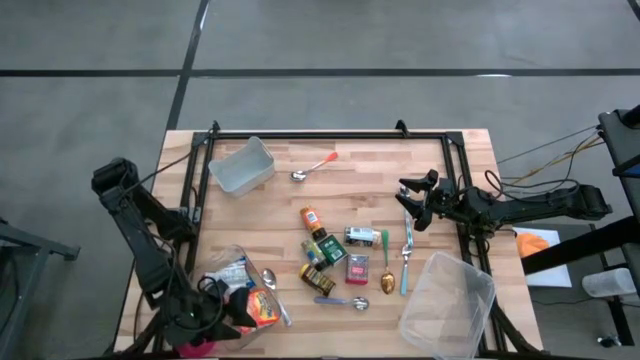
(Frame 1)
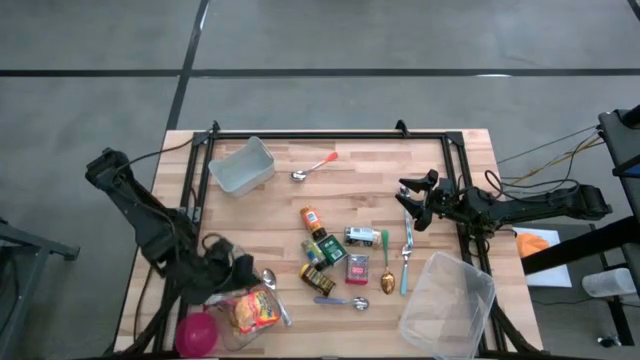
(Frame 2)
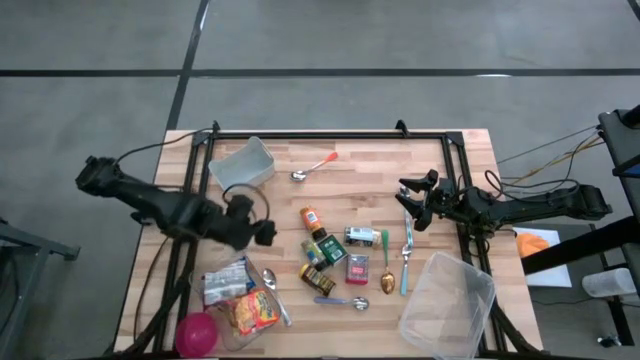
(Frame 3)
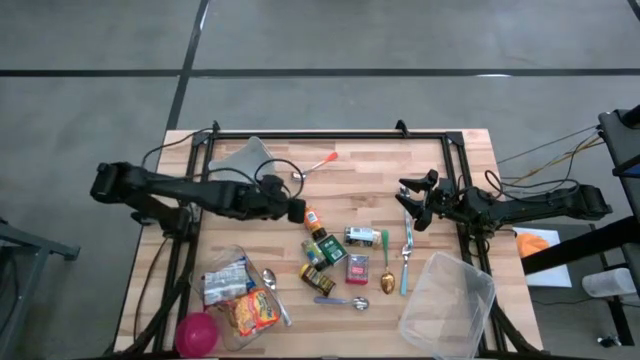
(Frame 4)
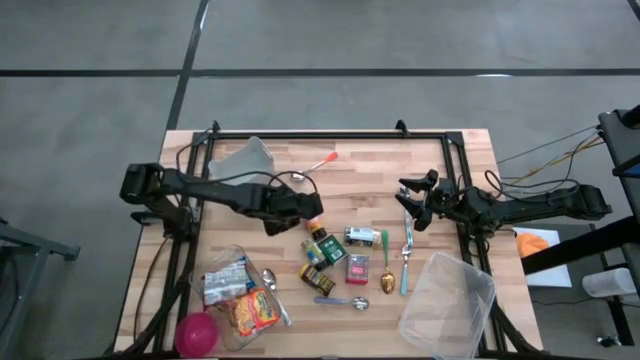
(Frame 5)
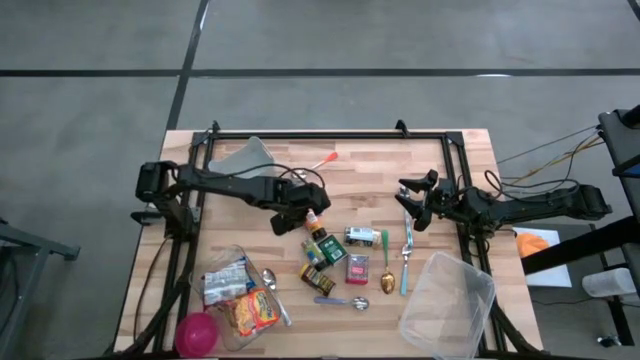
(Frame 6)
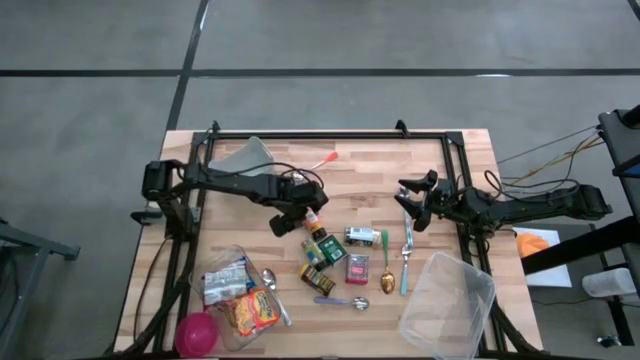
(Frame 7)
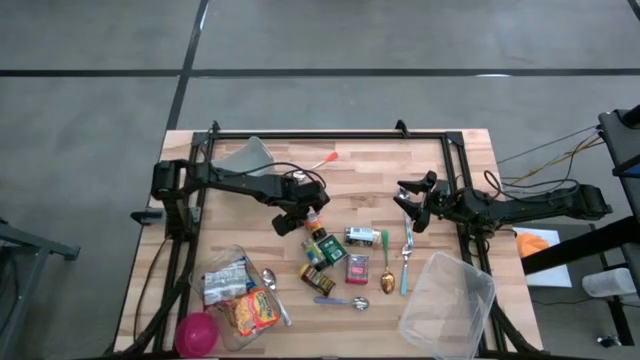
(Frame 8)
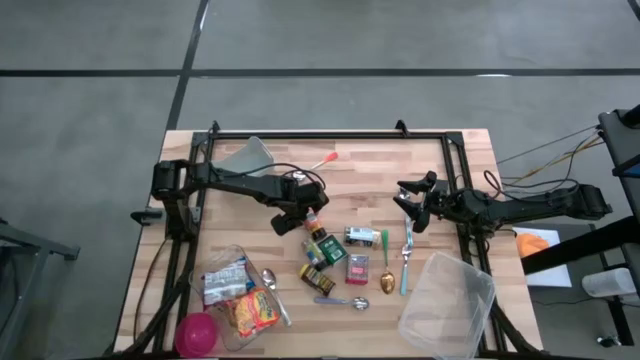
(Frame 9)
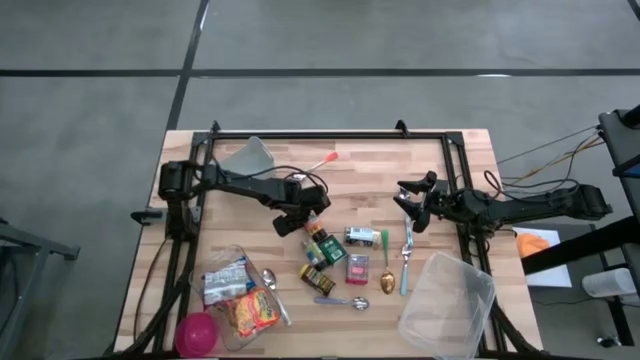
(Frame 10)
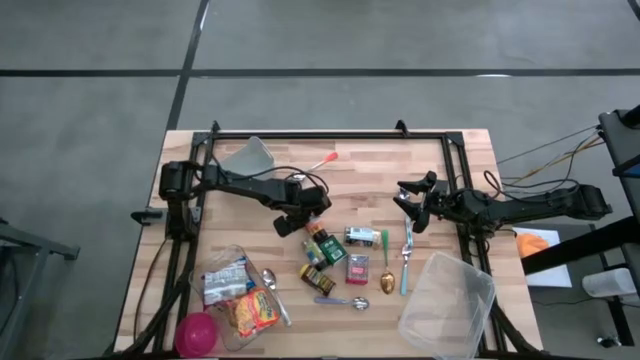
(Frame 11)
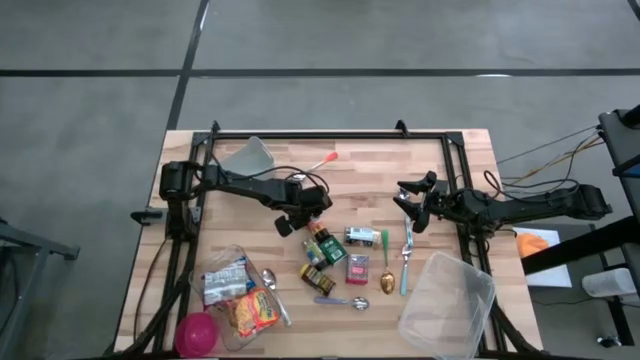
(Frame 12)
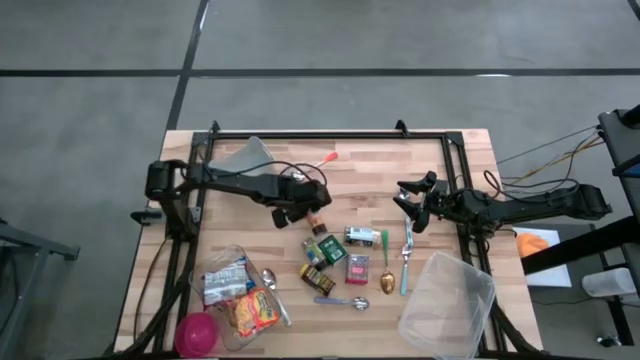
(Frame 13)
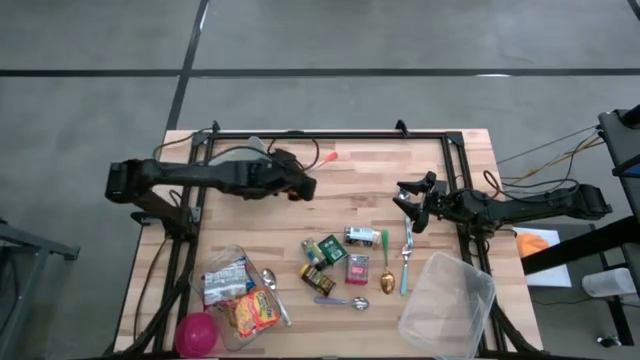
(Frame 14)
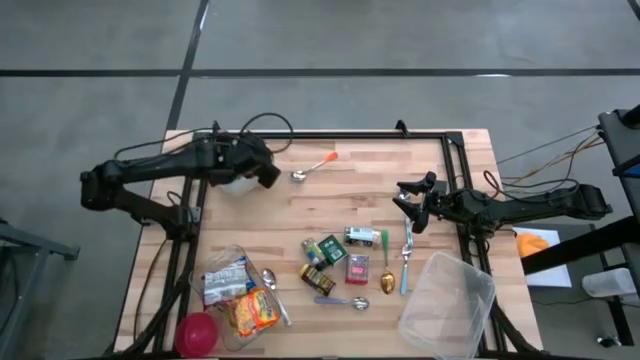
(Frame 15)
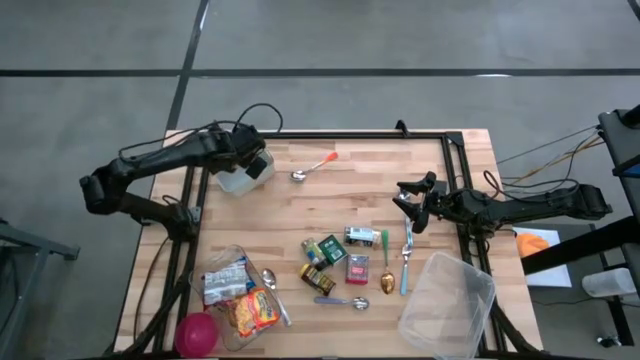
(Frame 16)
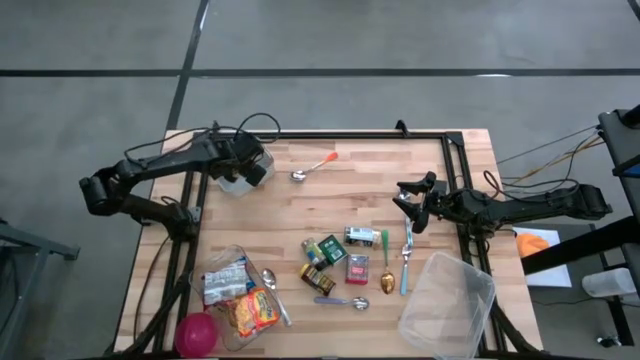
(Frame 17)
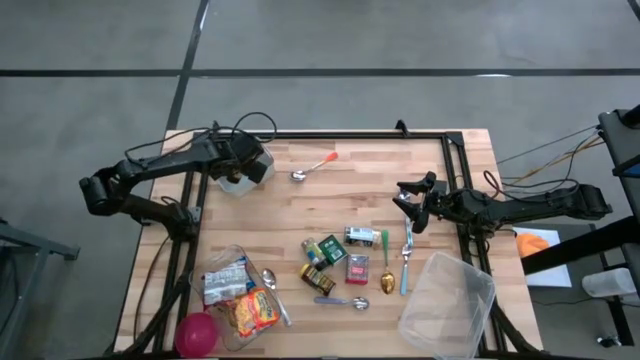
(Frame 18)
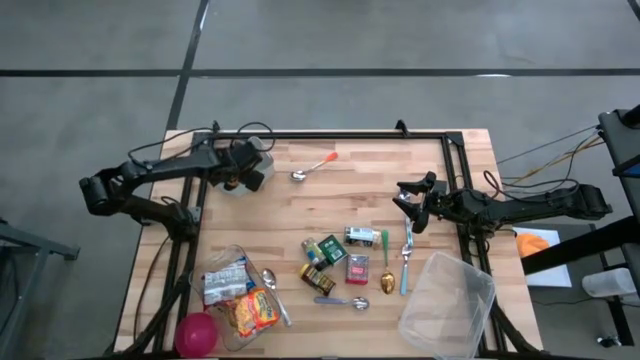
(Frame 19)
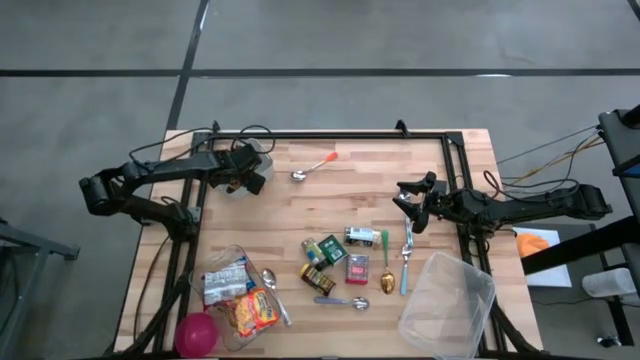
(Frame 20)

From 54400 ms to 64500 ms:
Put the orange seasoning bottle into the gray bin
